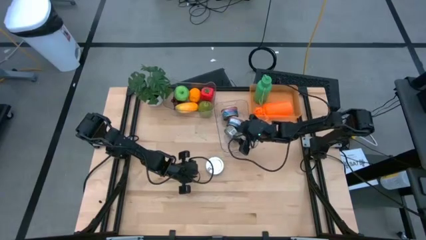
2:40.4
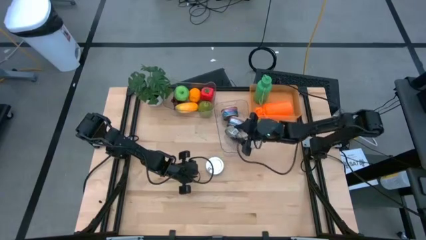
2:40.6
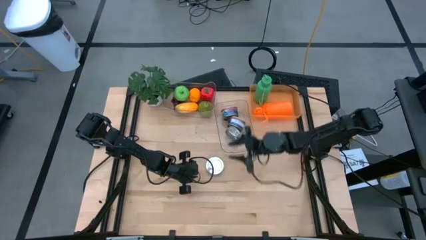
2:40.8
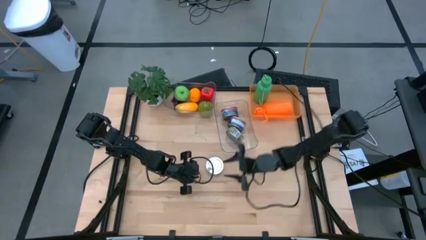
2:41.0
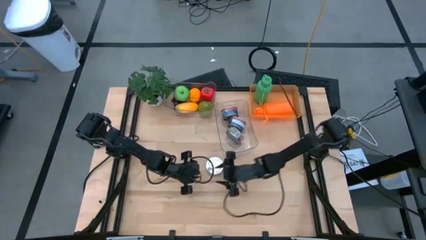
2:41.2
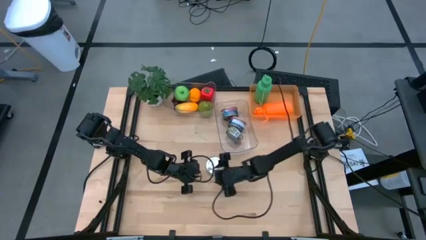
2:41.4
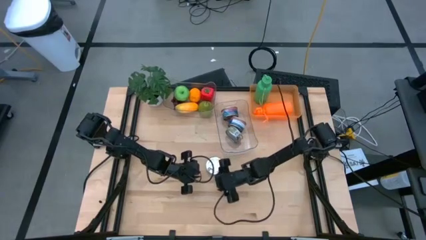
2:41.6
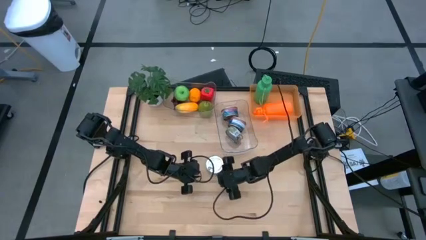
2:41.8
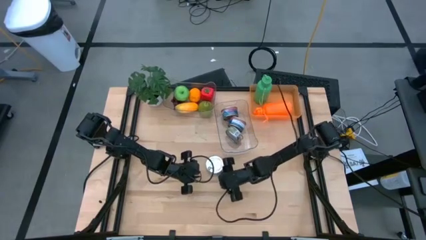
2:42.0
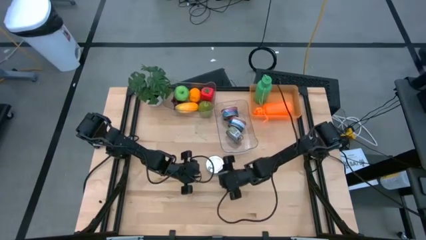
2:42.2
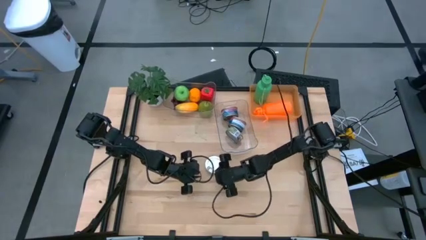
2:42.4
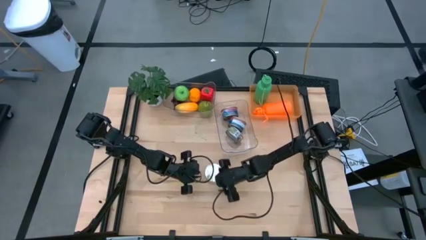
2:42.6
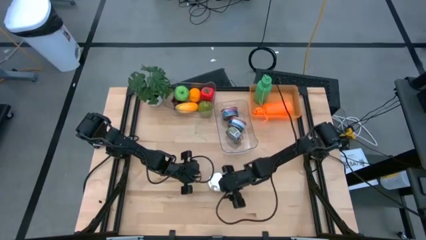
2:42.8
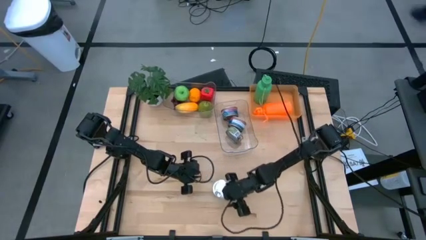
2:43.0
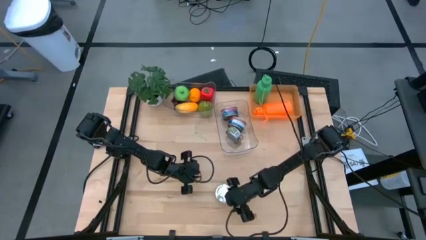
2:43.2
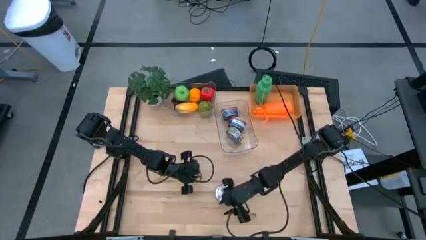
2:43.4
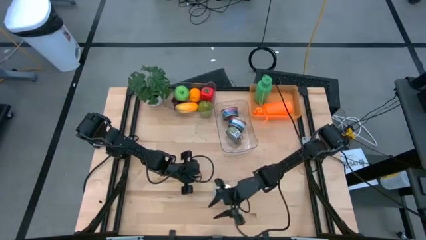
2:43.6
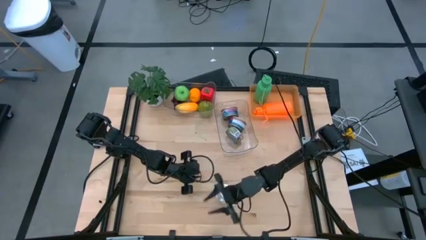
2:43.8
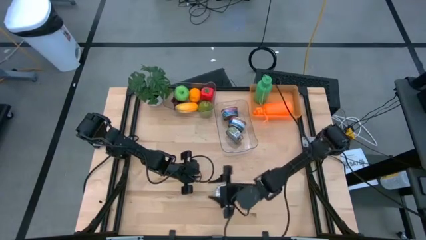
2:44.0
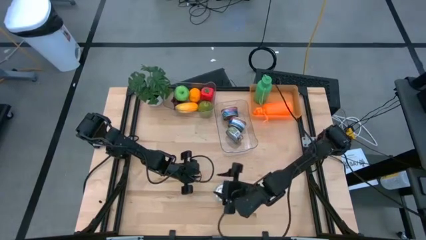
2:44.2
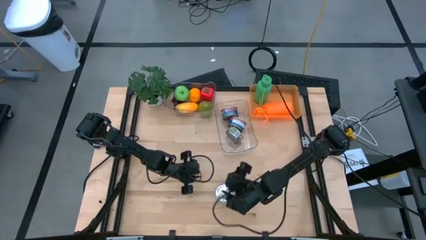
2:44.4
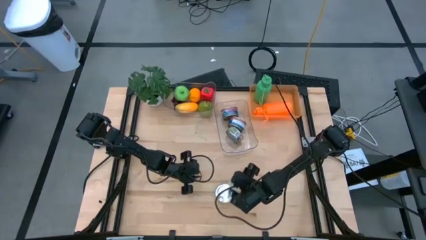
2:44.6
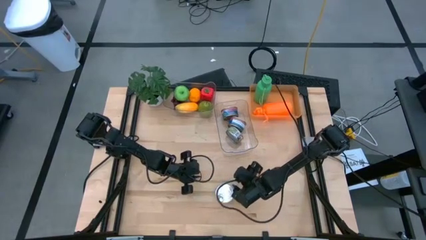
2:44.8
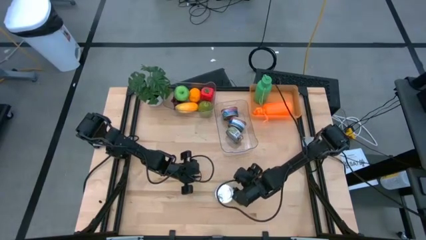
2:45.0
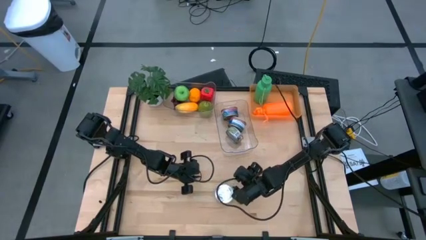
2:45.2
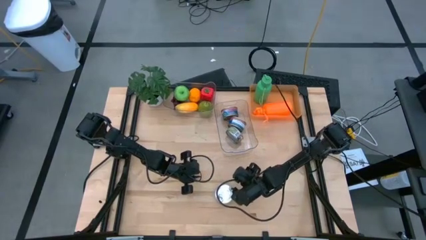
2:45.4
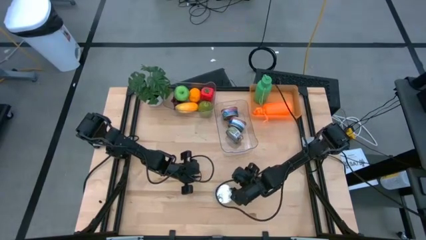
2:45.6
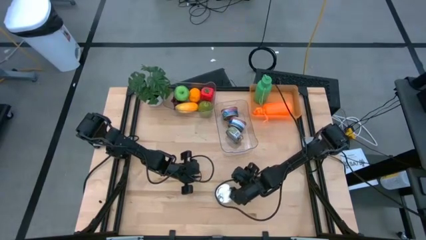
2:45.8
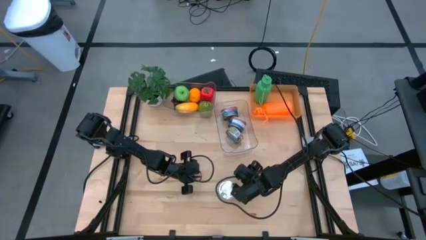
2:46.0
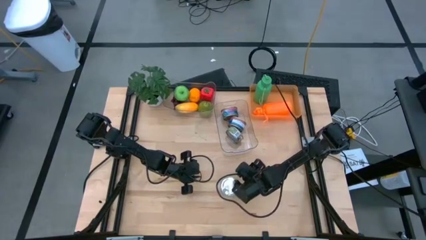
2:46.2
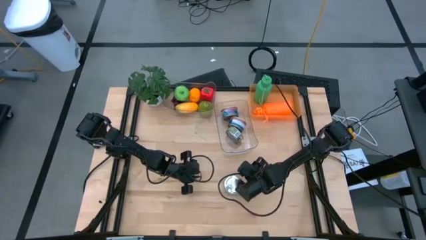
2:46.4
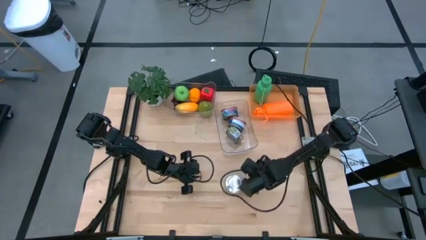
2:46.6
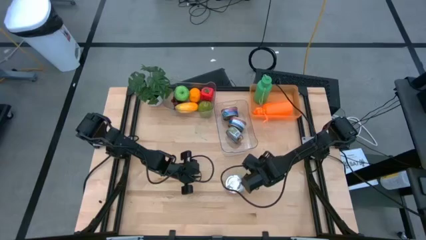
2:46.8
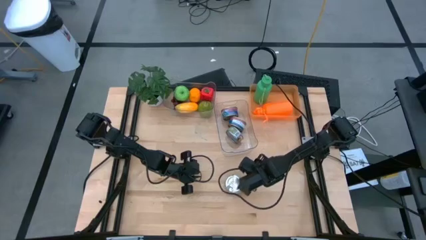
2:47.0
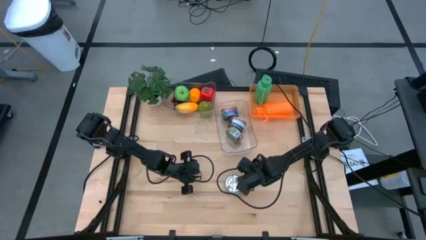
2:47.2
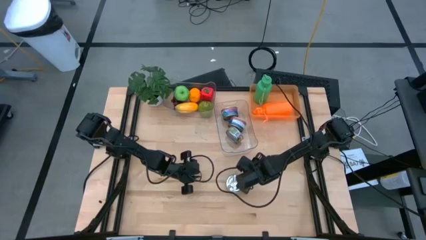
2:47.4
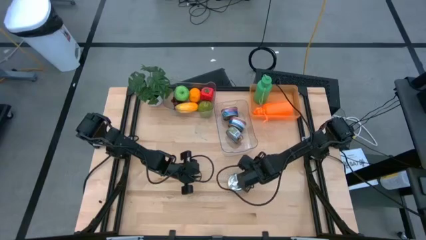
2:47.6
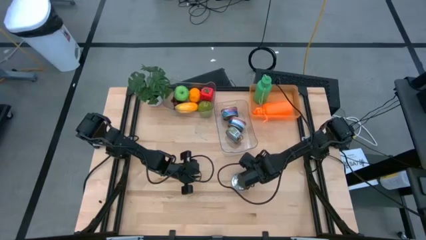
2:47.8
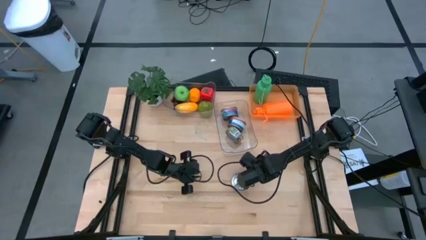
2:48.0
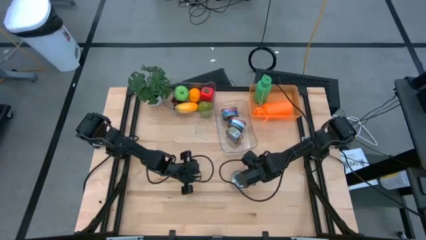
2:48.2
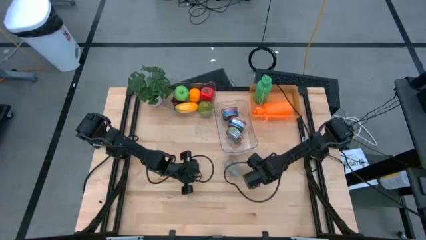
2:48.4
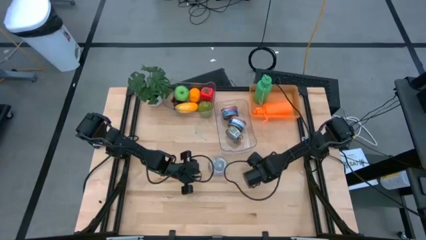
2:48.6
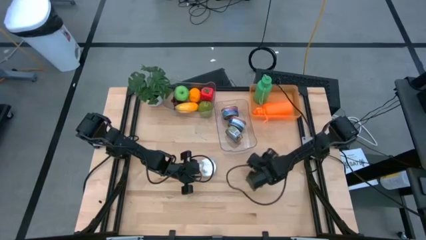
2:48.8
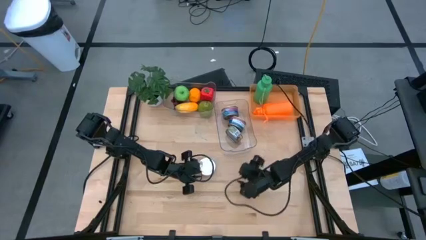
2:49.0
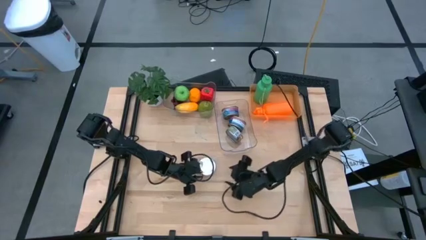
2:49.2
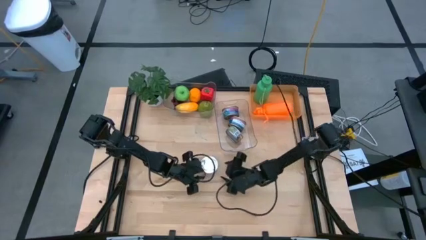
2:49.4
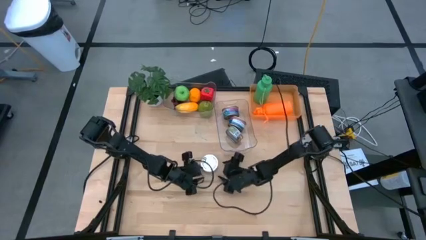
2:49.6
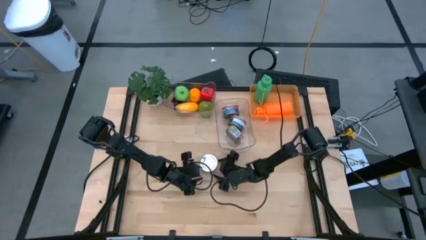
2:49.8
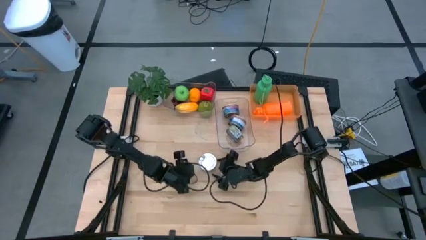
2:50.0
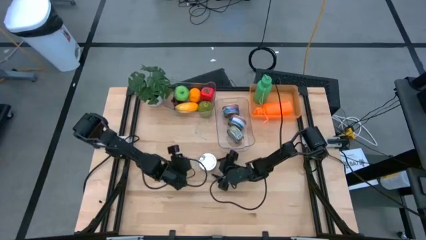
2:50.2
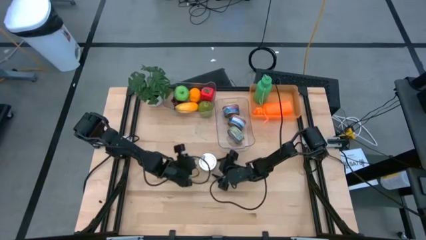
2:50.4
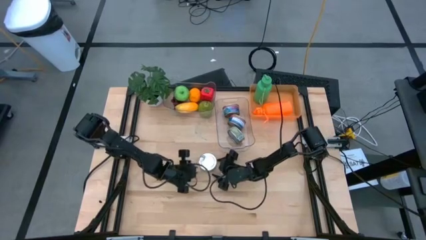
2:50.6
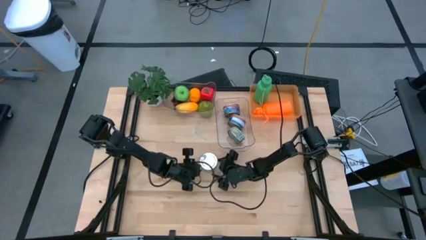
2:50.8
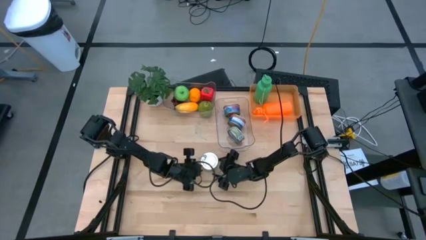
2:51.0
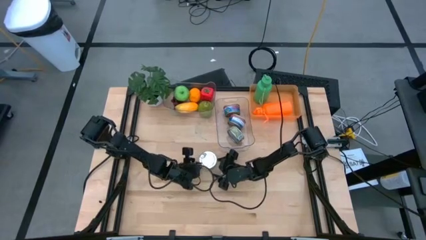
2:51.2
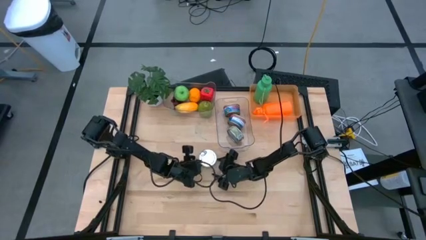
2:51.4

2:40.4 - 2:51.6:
Task: Pick & Place Food Item
Put the green tuna can into the bottom transparent bin

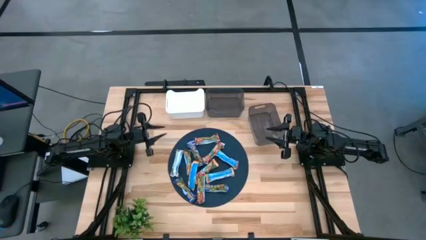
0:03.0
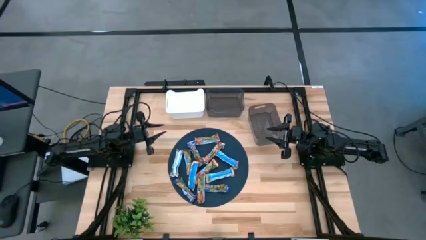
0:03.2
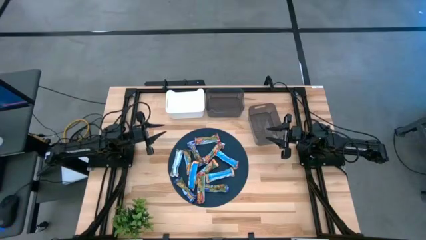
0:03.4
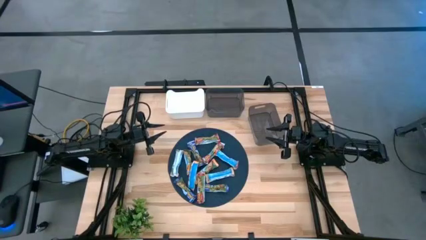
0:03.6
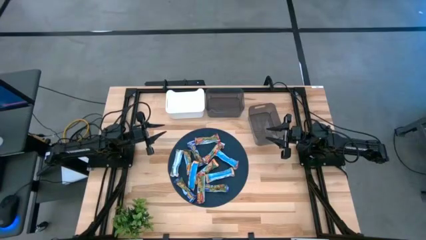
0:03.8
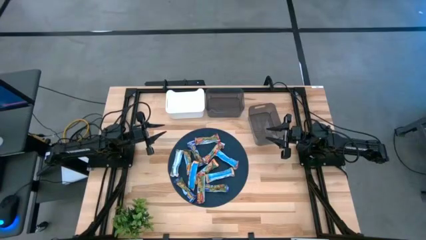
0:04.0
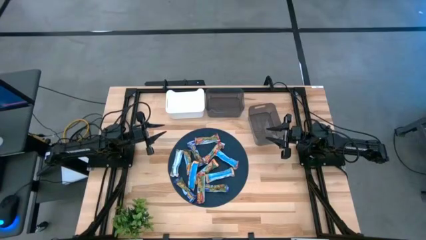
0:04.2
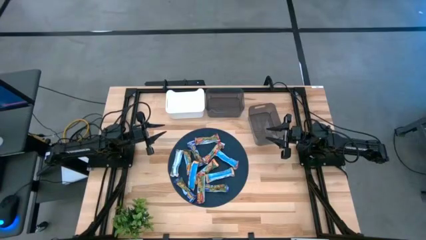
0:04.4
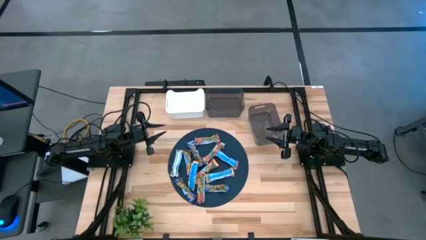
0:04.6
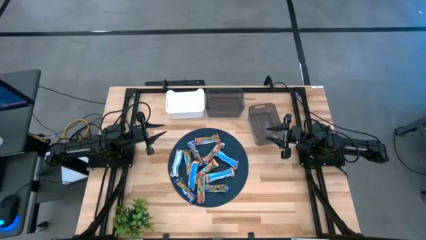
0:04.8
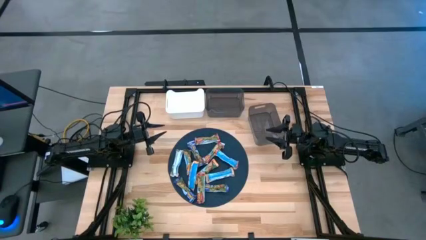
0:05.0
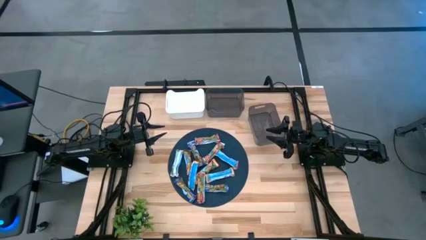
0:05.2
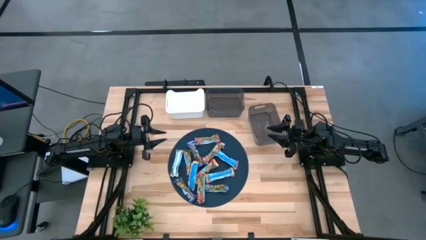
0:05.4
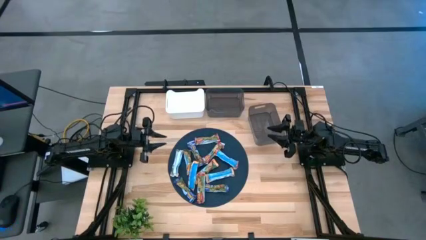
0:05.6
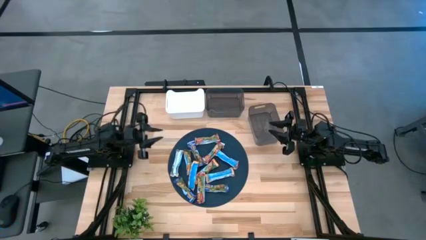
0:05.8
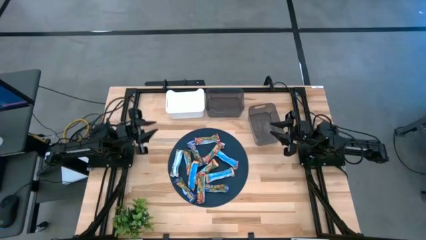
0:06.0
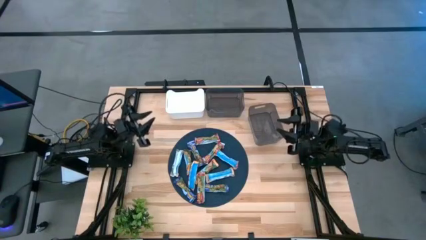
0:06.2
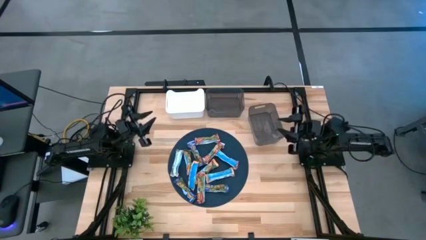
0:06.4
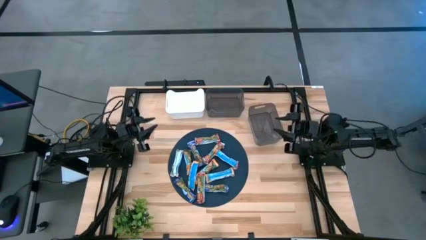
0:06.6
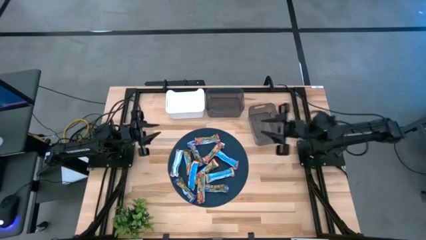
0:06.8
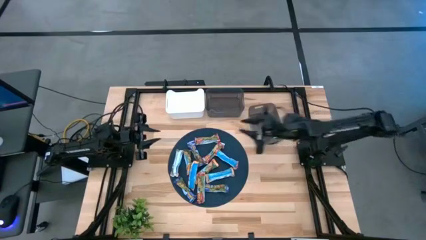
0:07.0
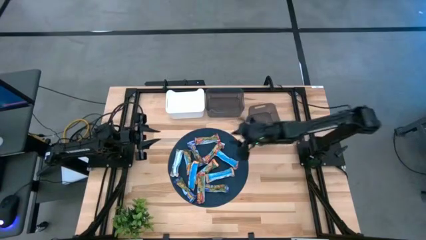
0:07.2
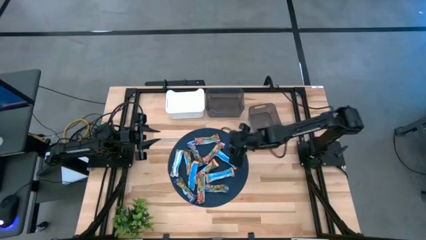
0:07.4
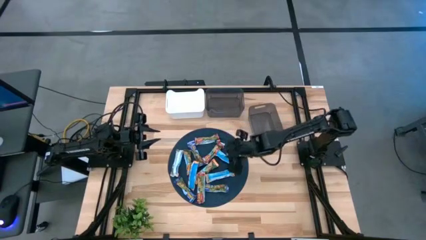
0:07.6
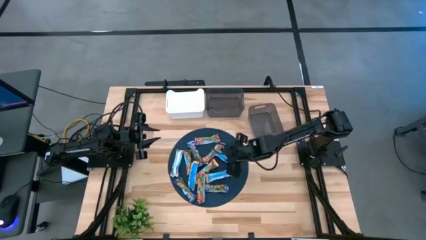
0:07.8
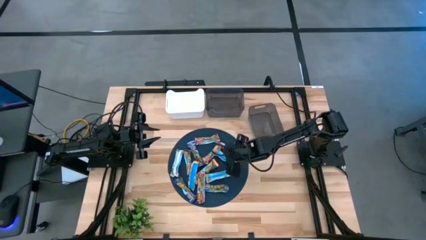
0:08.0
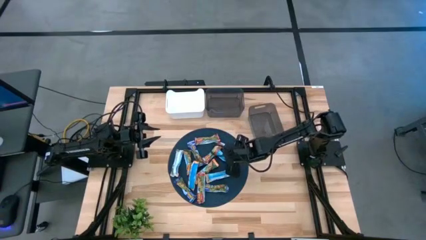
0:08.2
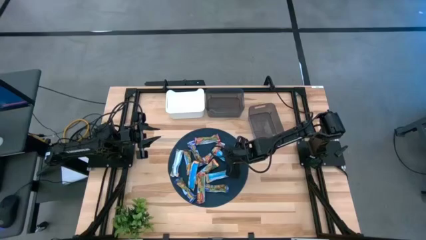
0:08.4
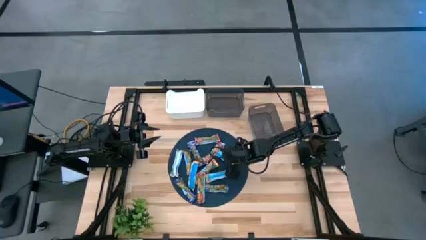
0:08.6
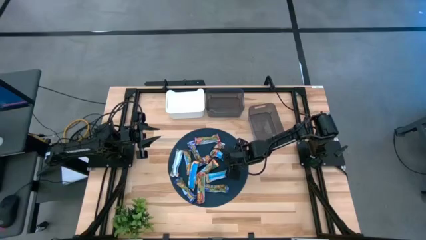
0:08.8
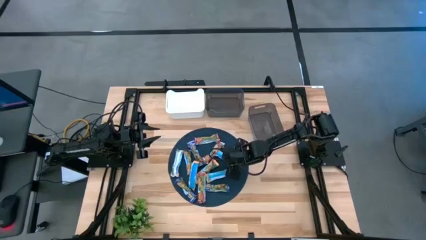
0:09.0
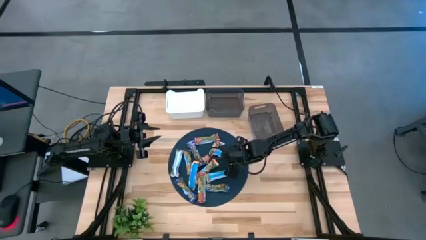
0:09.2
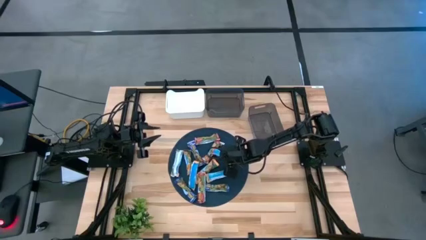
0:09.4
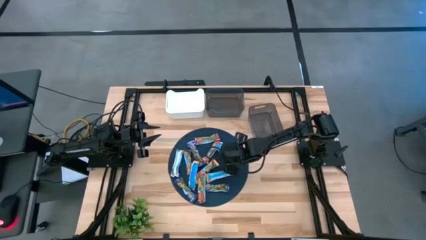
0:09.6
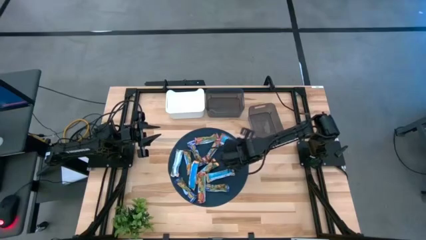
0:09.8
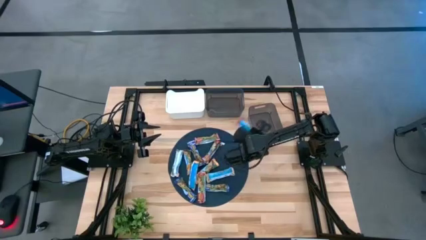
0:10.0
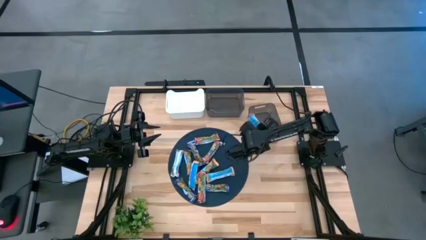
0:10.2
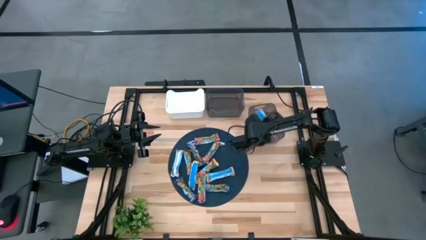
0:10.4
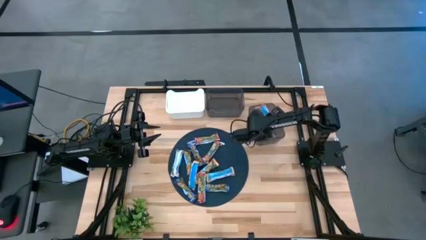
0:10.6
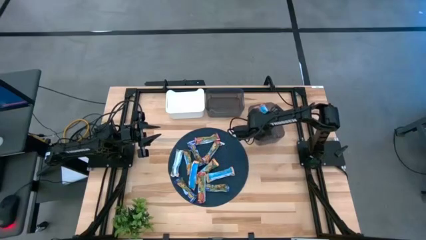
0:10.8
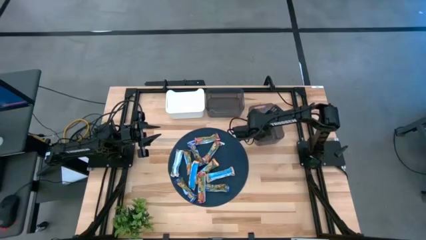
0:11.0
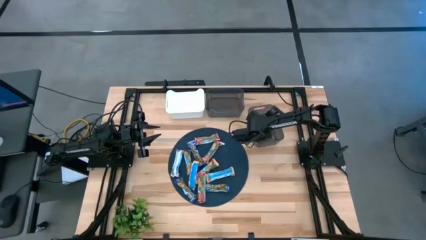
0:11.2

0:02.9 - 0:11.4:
Task: Pick and place Granola Bars by type
Put the red granola bar into the bottom black bin
